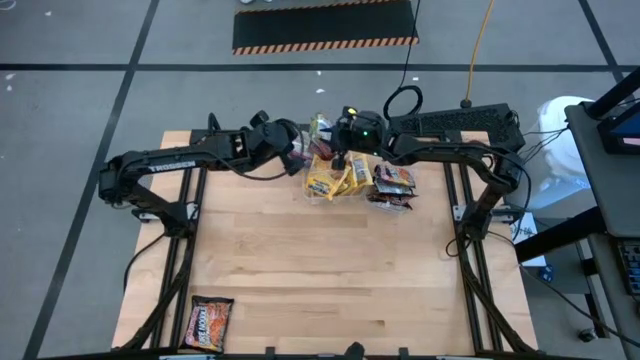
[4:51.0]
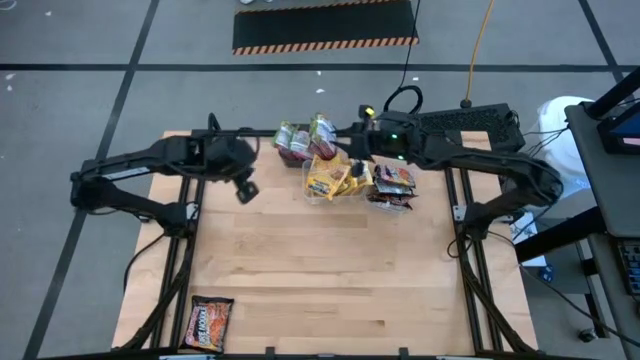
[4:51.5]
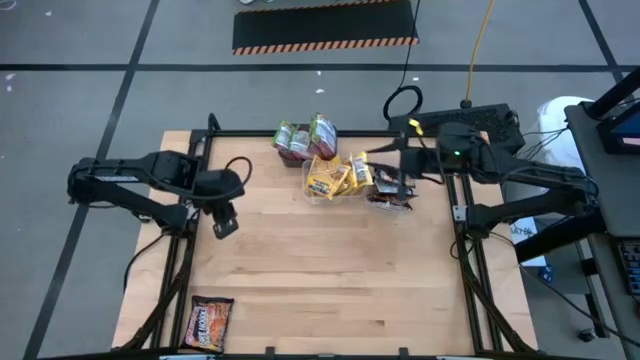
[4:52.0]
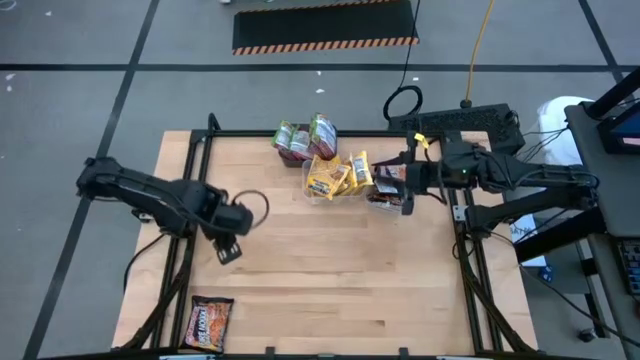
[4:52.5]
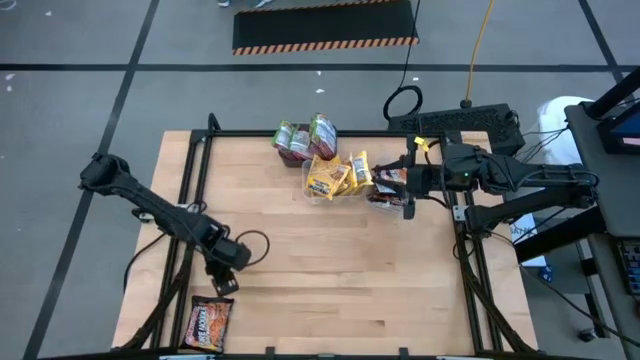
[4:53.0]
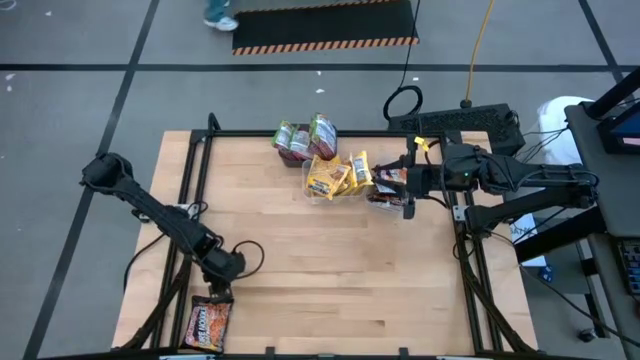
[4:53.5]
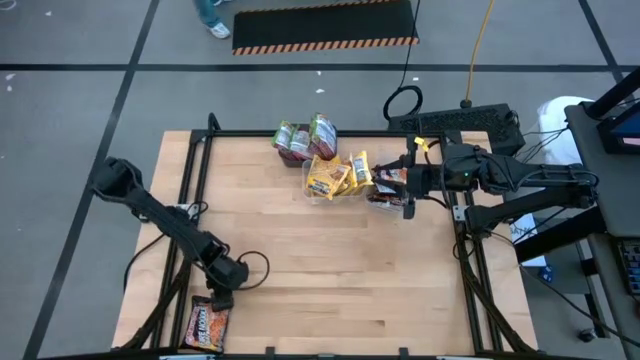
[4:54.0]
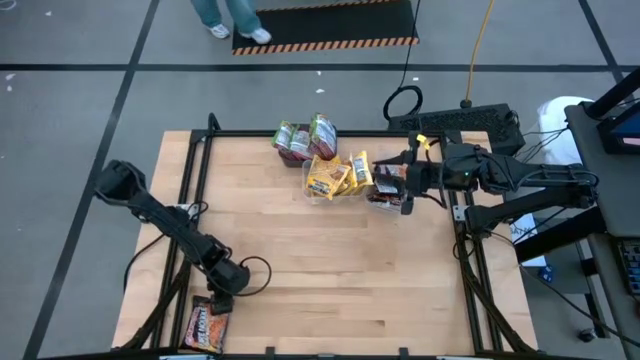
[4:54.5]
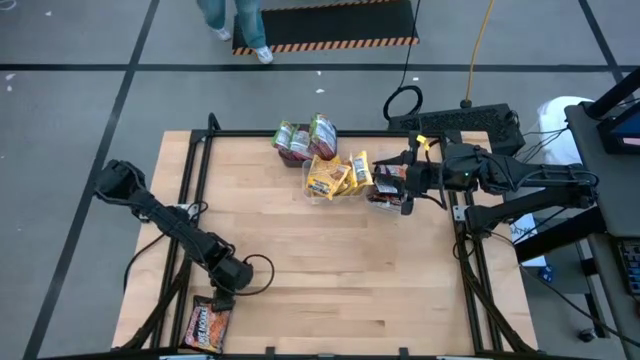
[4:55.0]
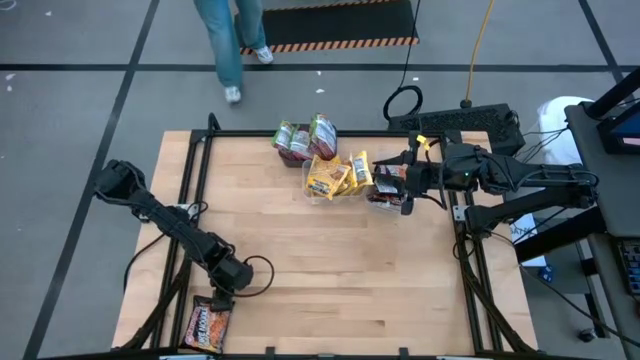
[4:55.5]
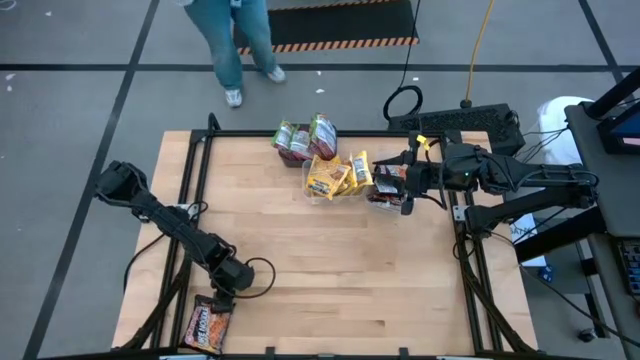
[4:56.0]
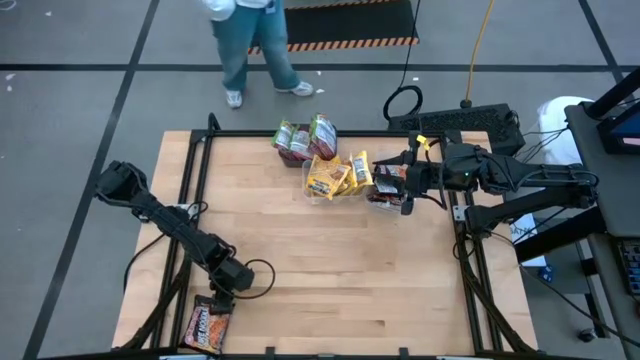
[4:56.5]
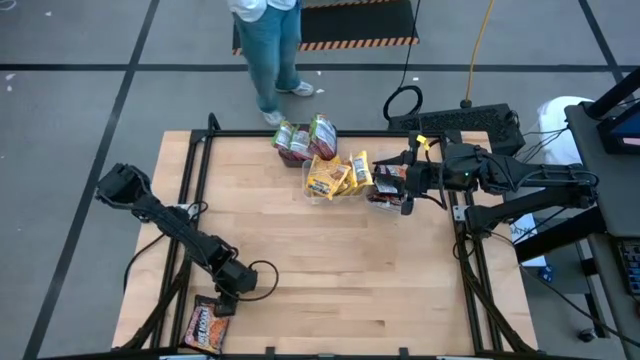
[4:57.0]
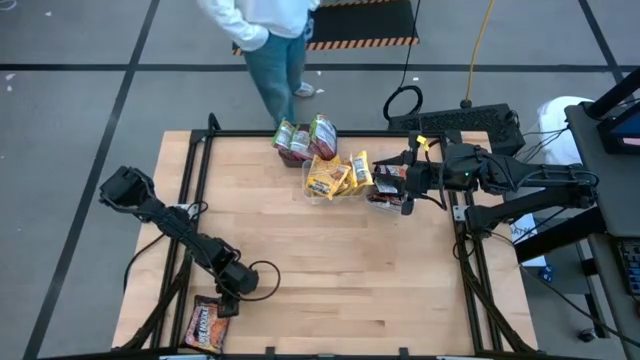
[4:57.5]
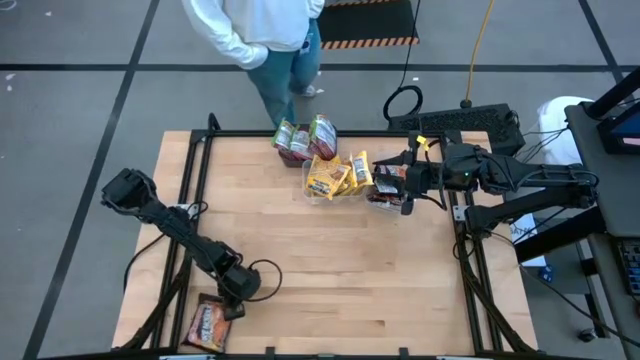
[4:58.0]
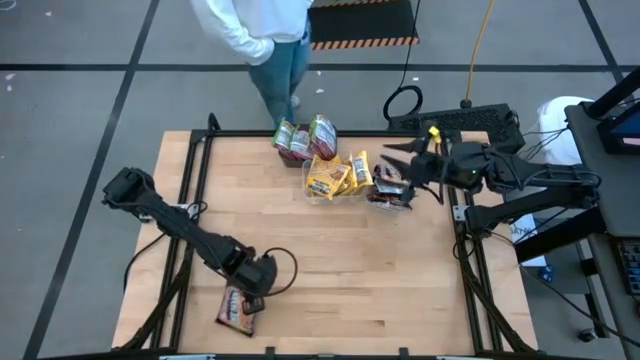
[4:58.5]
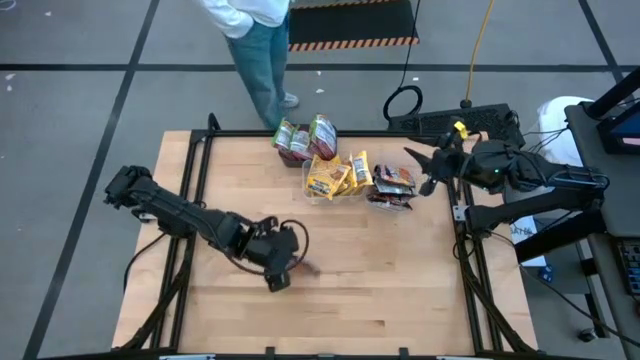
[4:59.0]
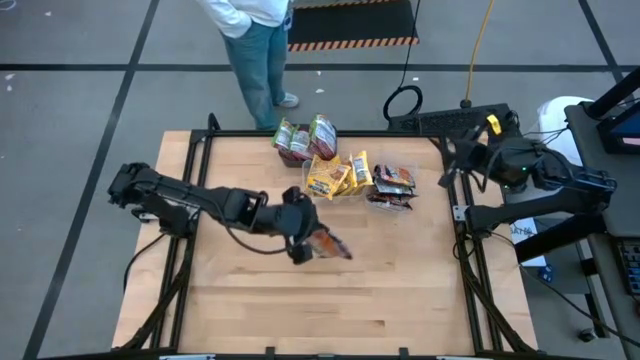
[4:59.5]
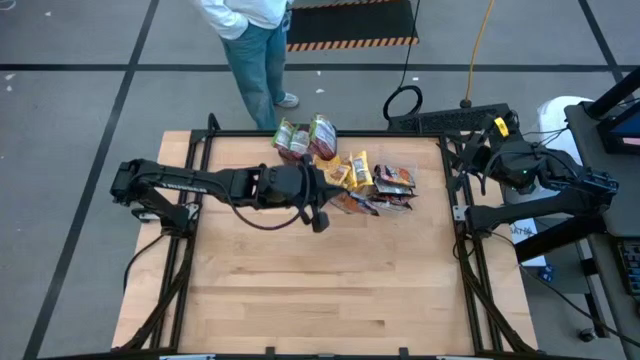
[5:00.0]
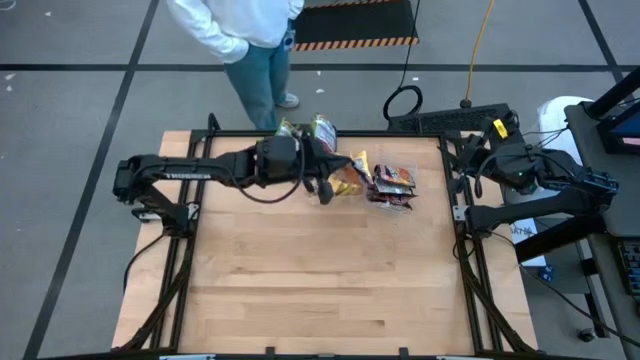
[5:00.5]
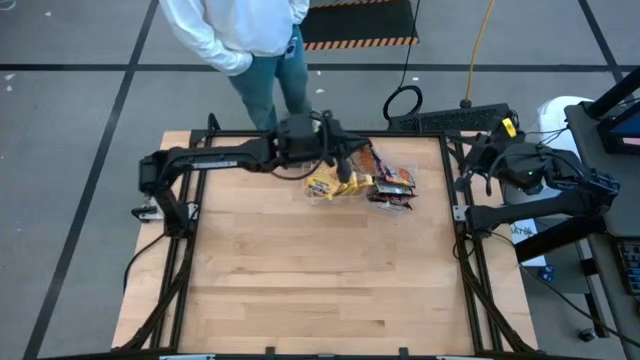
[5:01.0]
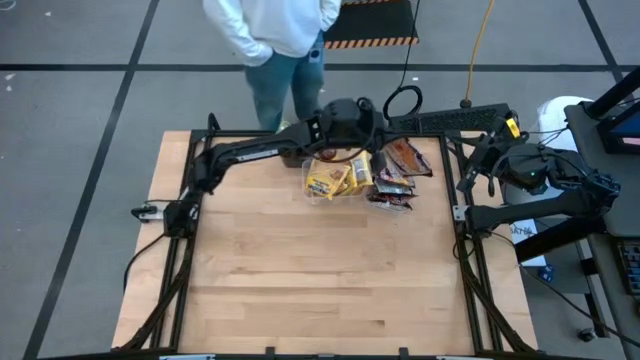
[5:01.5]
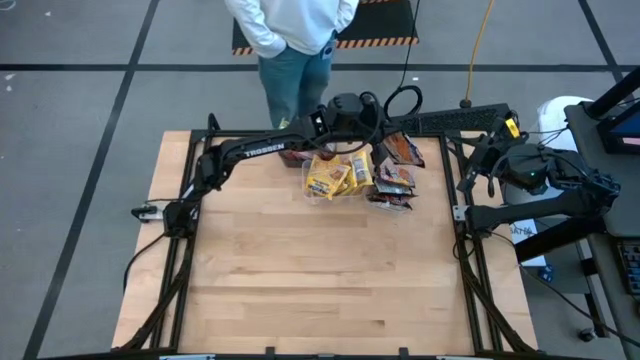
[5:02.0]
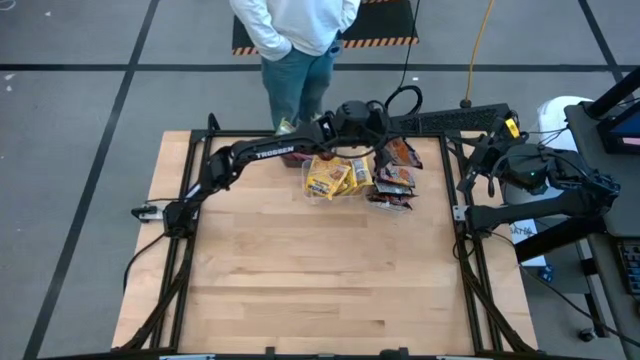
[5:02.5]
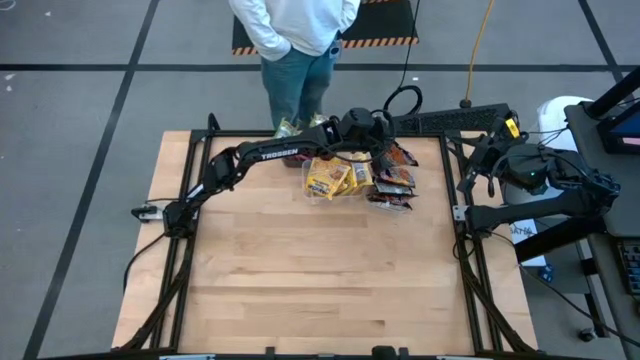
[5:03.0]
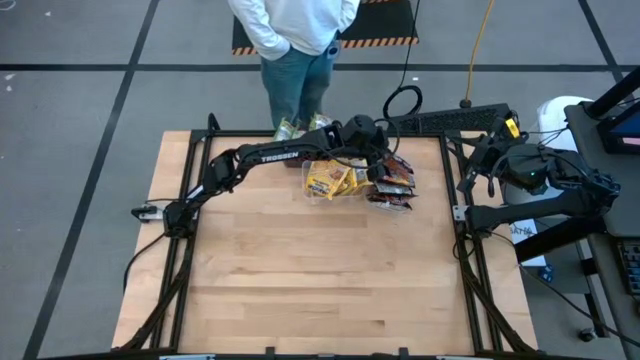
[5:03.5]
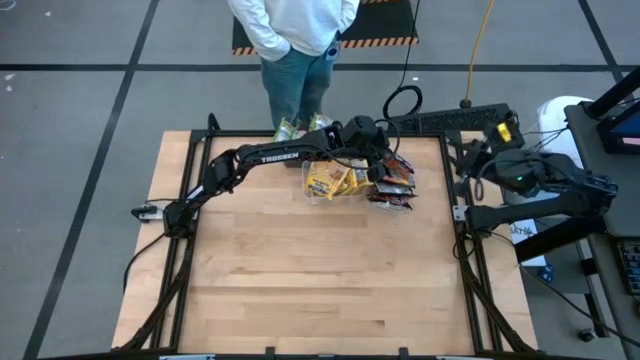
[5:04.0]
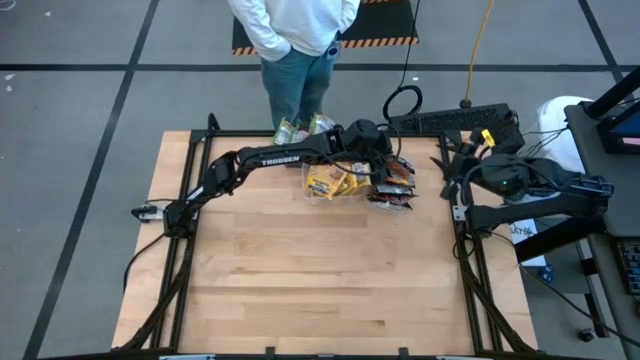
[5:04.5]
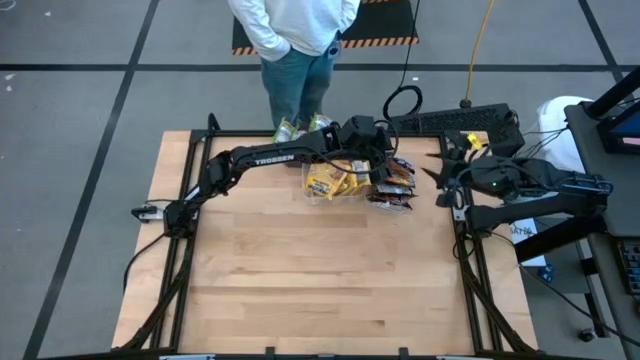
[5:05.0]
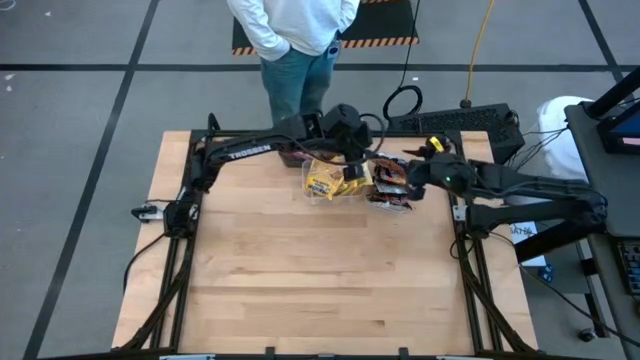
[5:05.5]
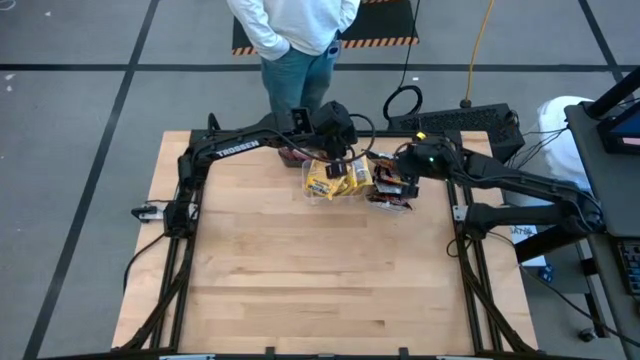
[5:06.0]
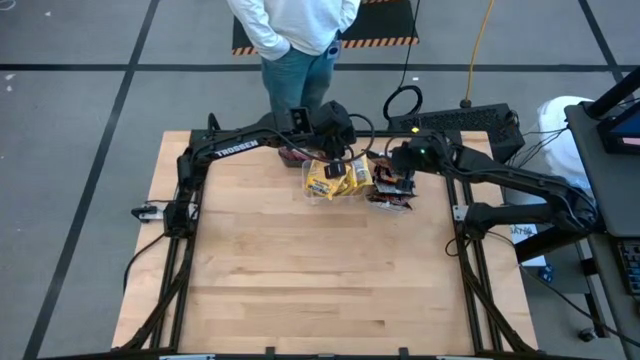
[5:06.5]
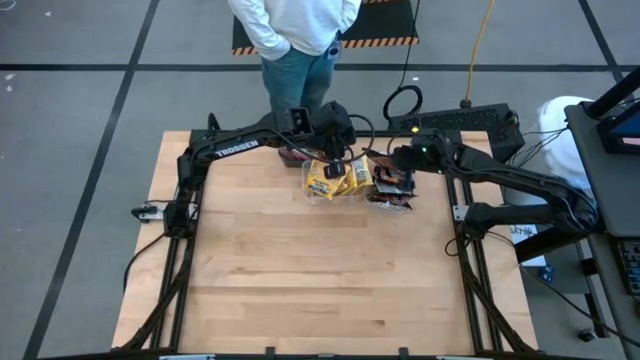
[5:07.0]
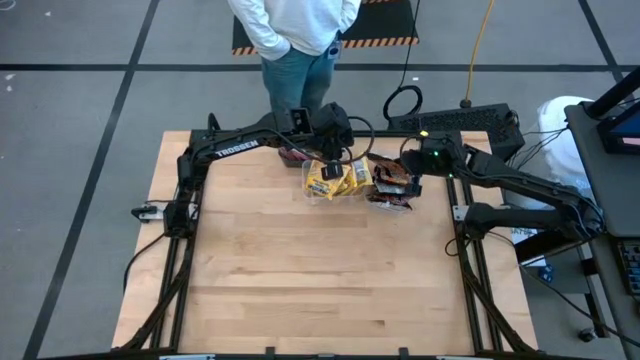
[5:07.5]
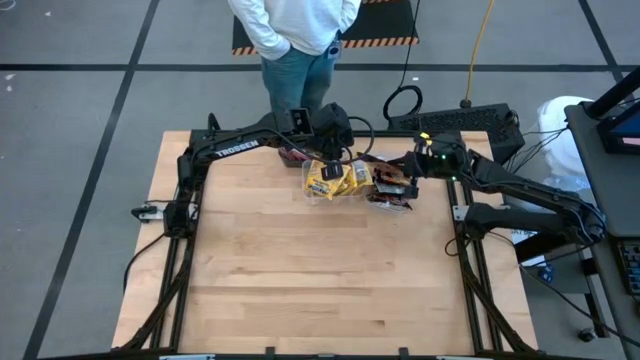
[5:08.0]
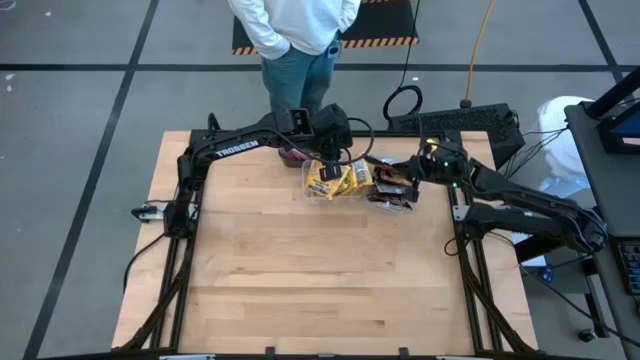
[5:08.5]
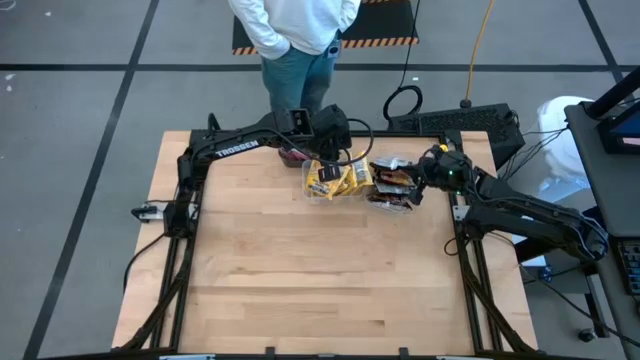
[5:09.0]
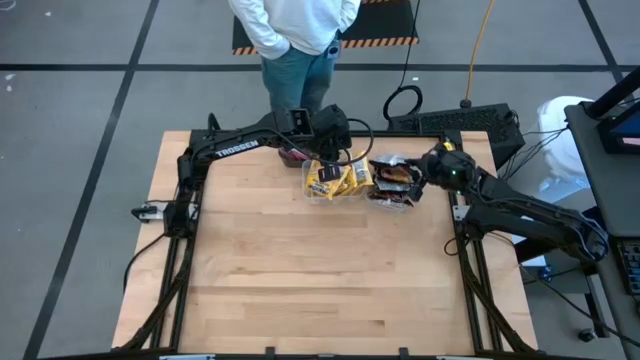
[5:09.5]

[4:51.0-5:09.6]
Task: Sort Maruchan noodles
Put the black noodle pack into the right transparent bin
